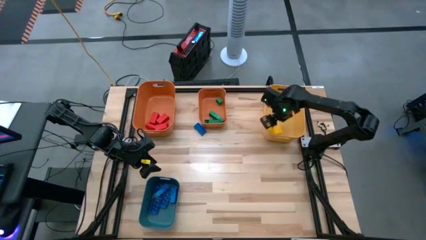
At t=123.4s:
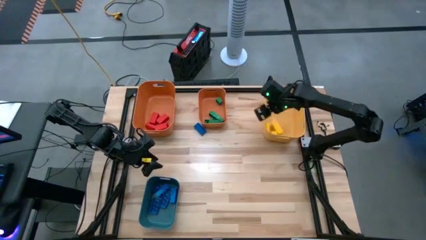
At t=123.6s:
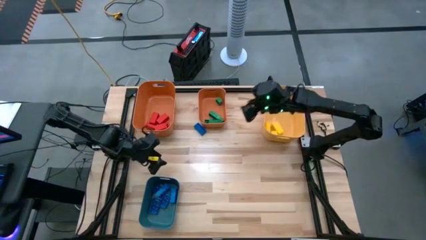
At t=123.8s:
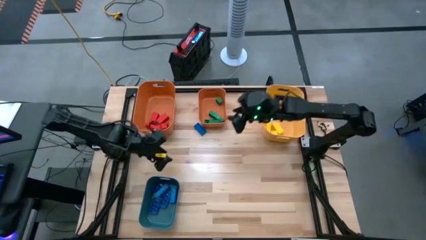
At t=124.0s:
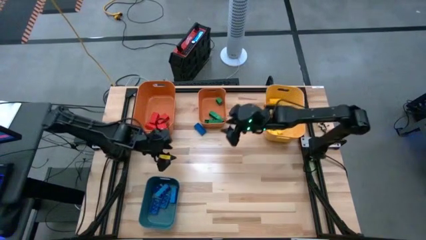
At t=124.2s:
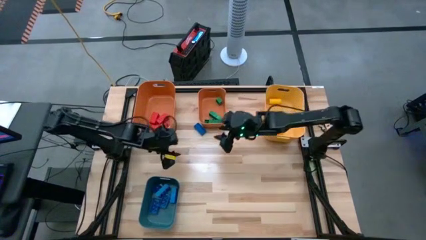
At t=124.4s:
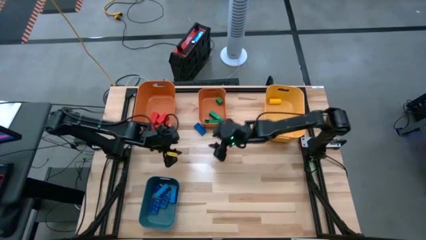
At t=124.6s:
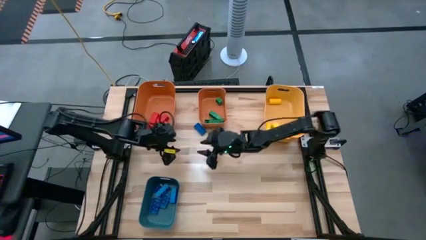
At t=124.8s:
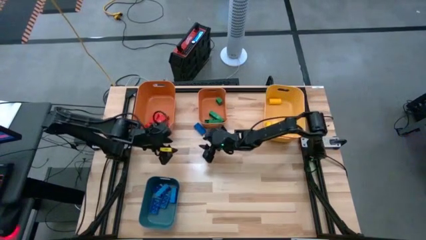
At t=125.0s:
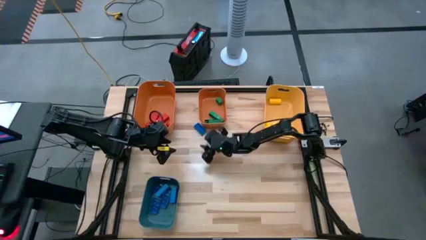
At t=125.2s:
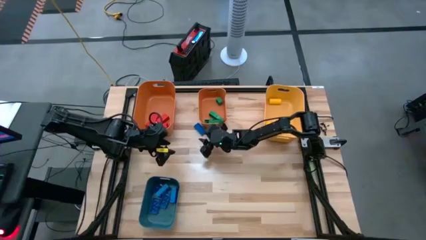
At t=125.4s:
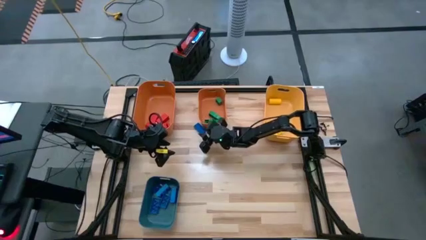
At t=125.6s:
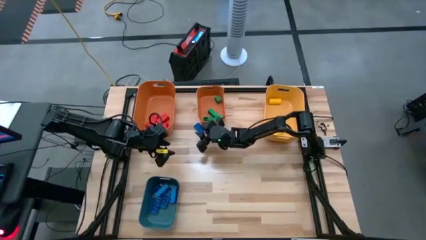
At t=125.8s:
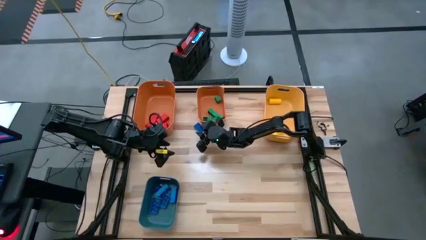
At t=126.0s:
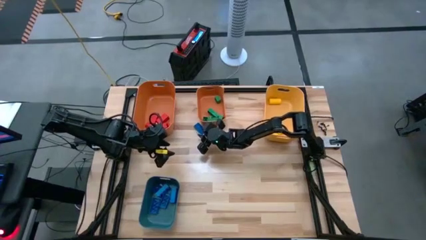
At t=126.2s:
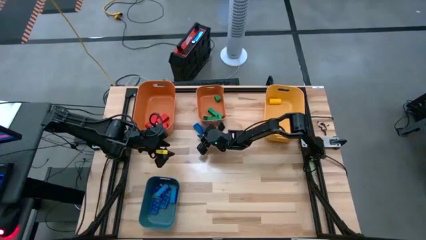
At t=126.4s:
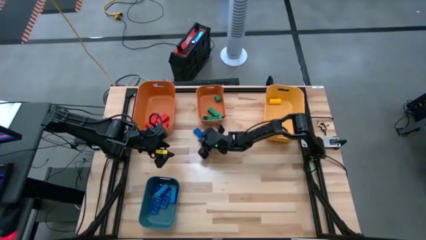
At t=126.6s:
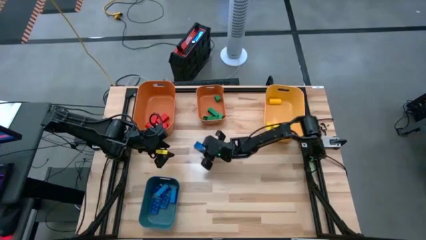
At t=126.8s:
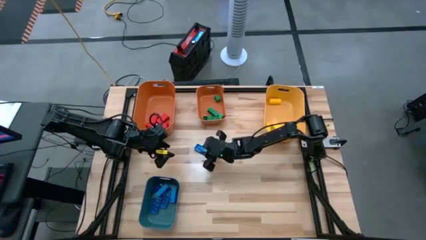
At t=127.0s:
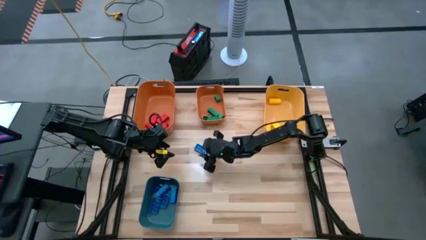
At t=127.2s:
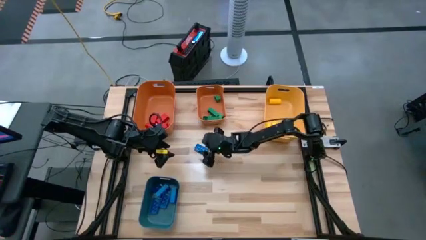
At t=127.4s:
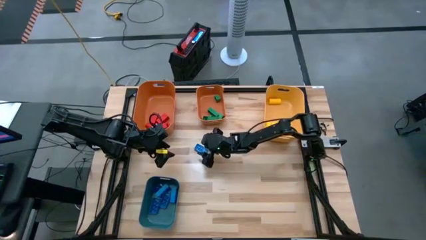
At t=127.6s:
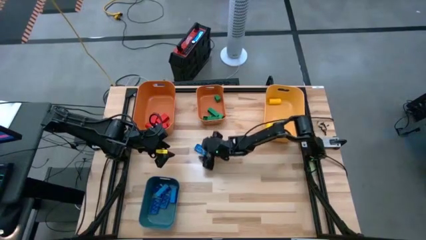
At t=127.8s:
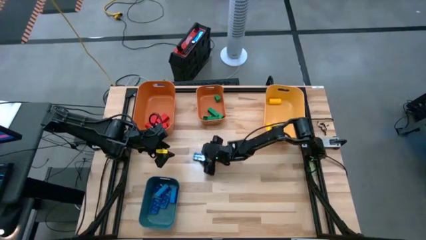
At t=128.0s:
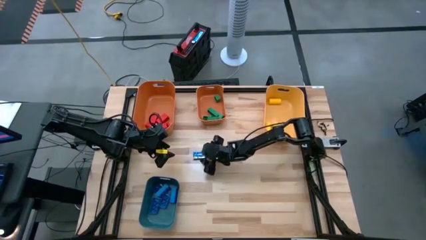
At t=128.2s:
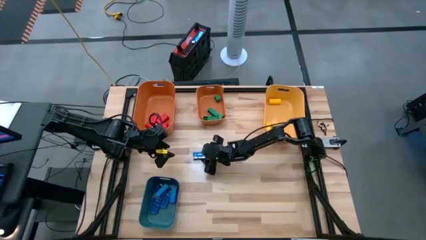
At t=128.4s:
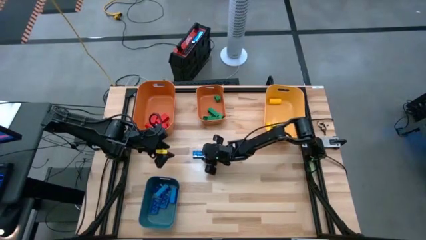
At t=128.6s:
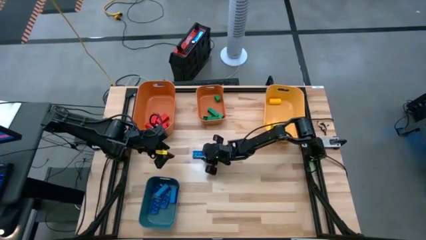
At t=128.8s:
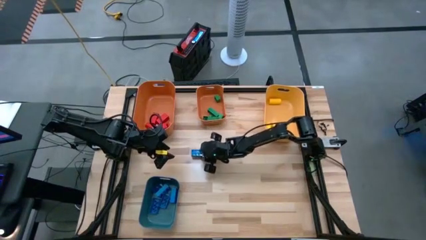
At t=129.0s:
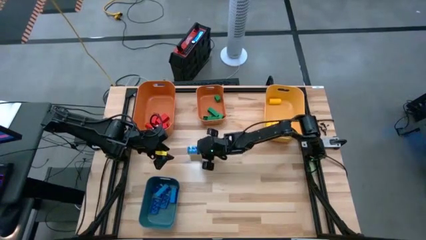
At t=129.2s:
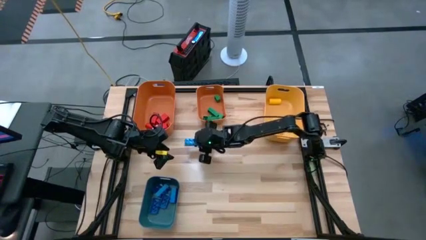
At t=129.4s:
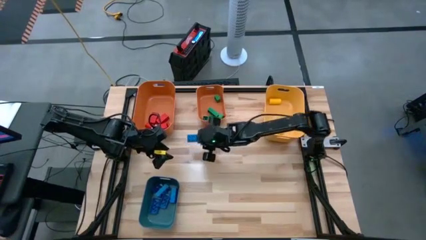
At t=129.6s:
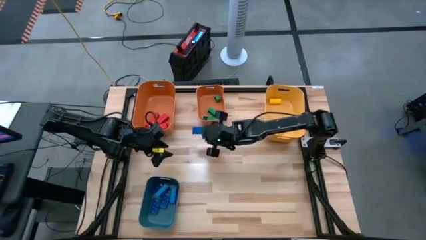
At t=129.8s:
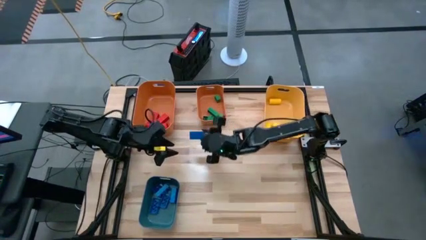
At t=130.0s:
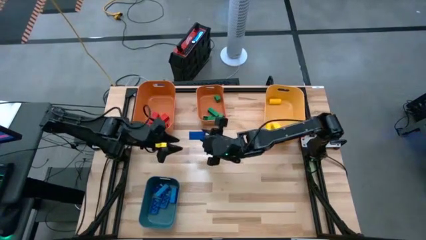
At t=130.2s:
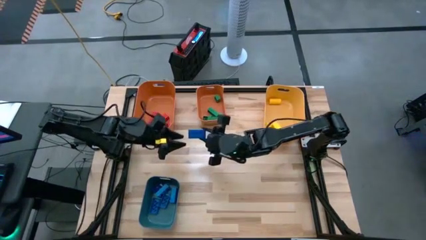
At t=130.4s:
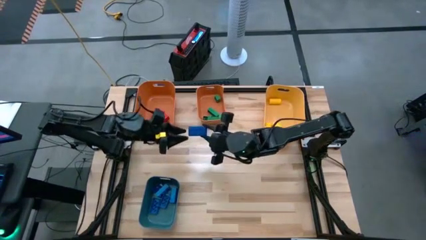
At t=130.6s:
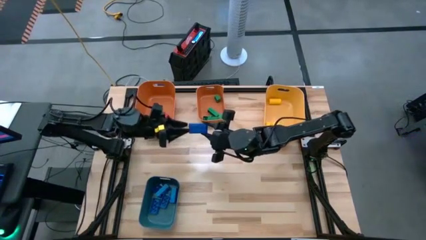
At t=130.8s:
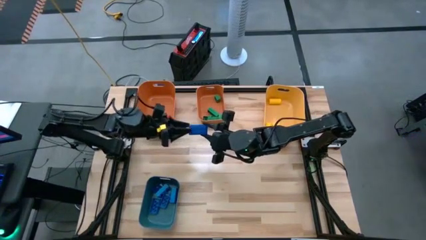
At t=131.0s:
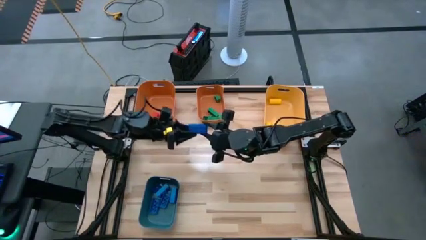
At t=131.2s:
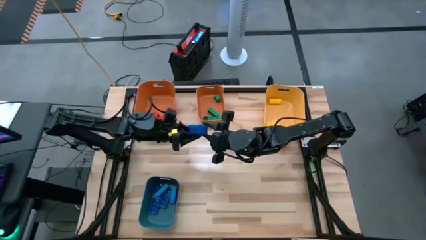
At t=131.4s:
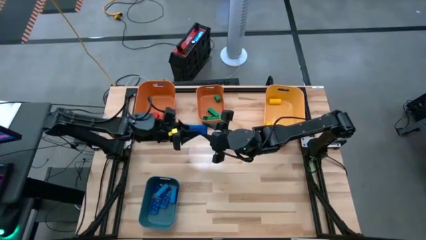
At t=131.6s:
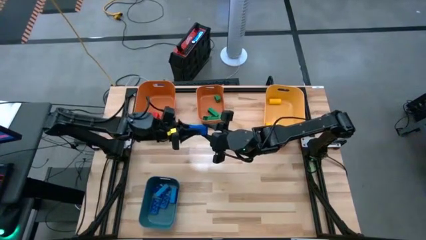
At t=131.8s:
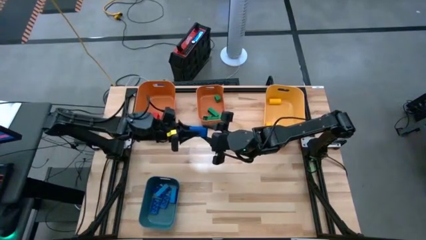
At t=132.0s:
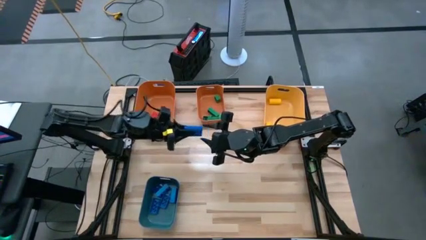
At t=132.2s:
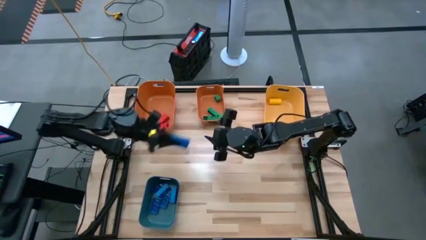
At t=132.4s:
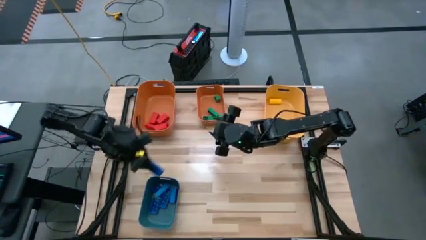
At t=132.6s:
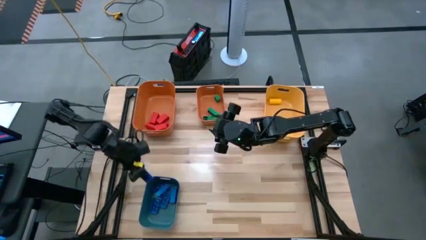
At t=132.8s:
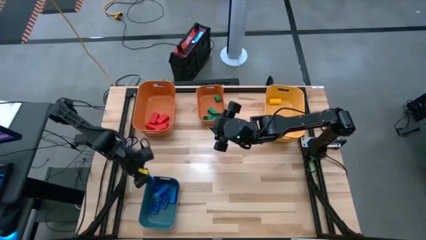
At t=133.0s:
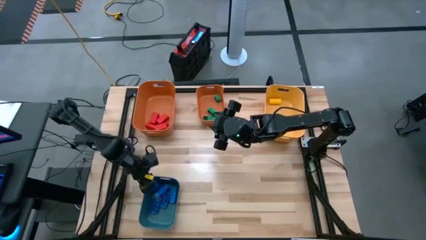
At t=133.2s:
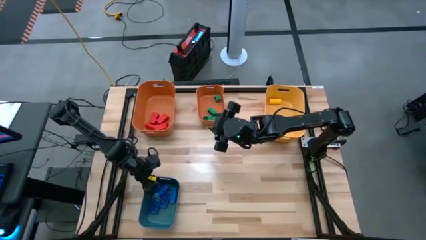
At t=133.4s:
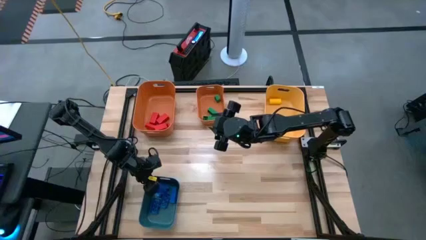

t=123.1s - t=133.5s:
Task: Sort blocks
Put the blue game piece into the blue bin
